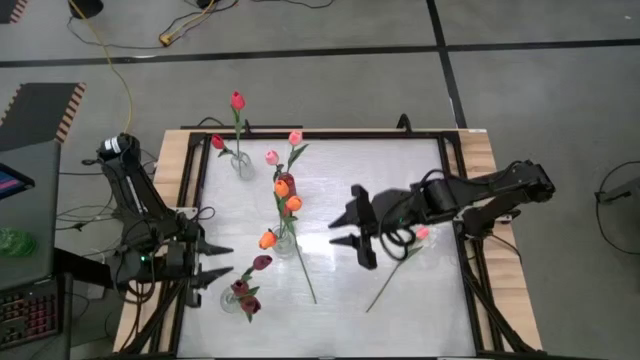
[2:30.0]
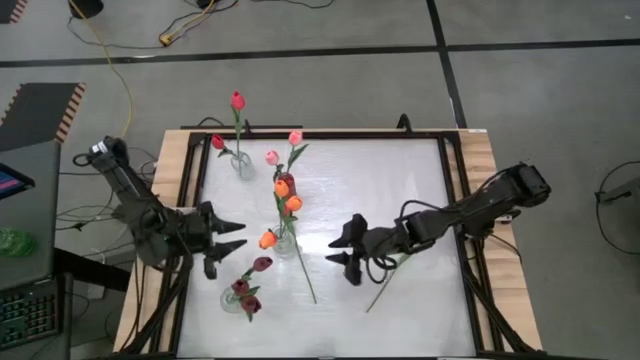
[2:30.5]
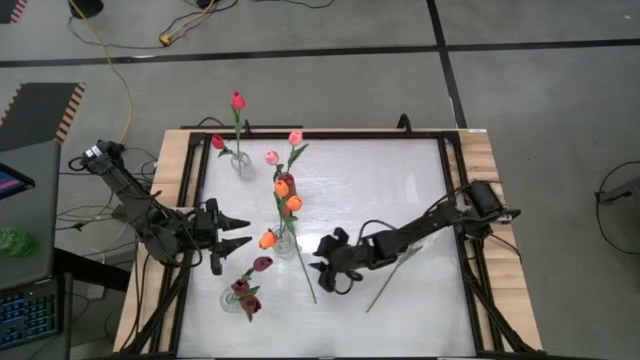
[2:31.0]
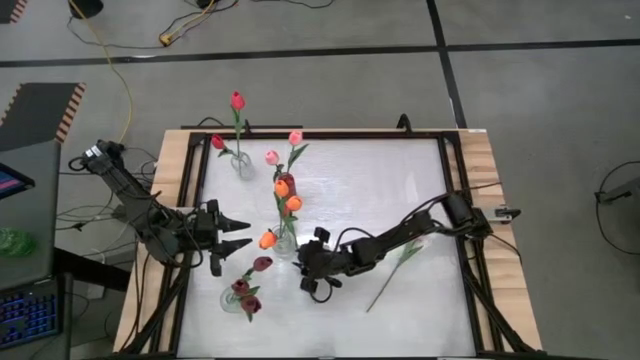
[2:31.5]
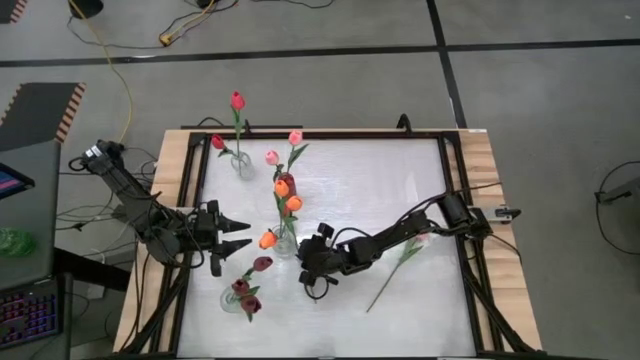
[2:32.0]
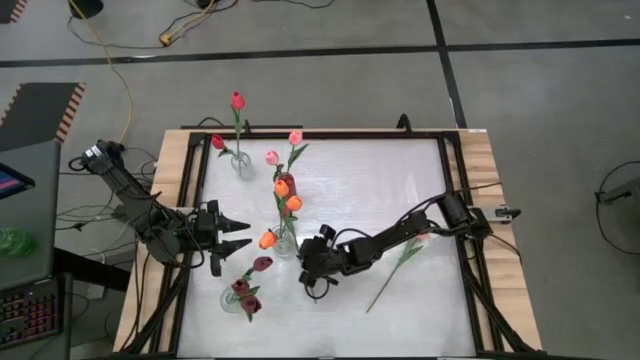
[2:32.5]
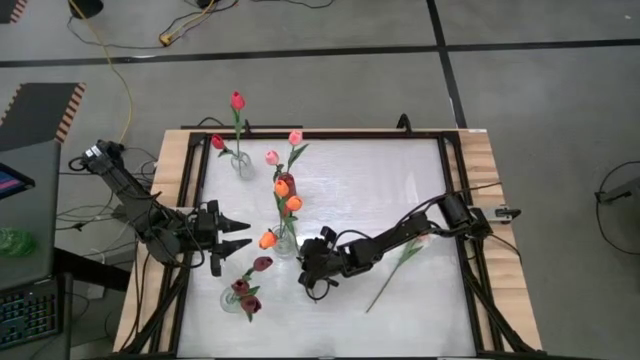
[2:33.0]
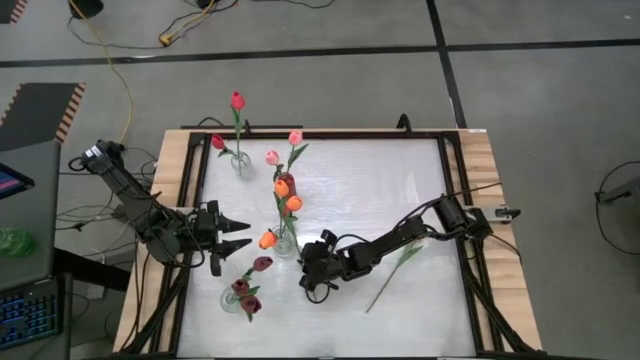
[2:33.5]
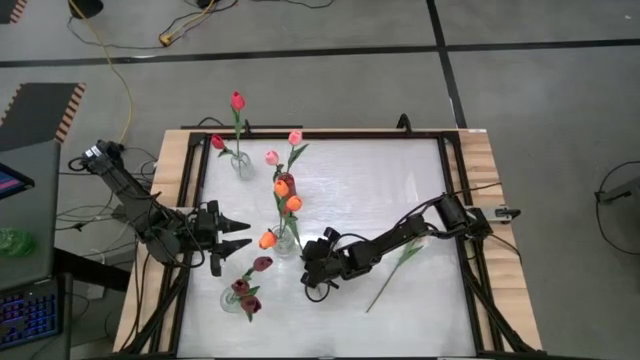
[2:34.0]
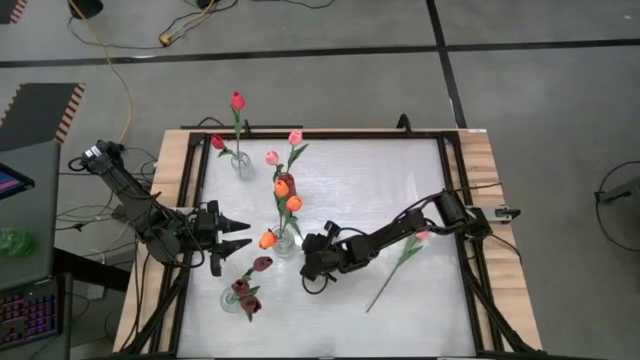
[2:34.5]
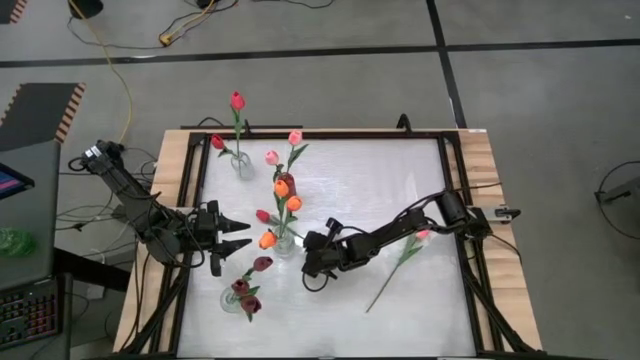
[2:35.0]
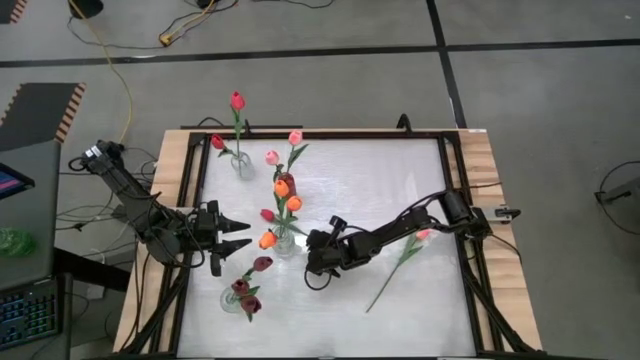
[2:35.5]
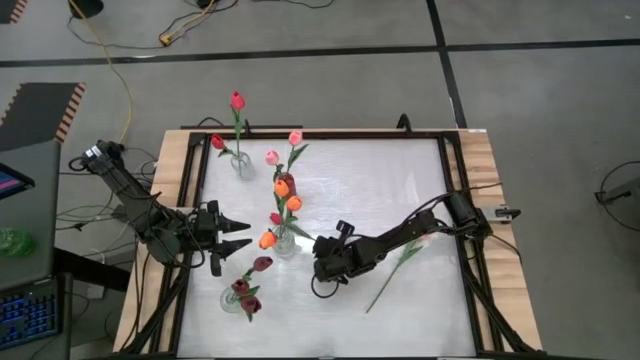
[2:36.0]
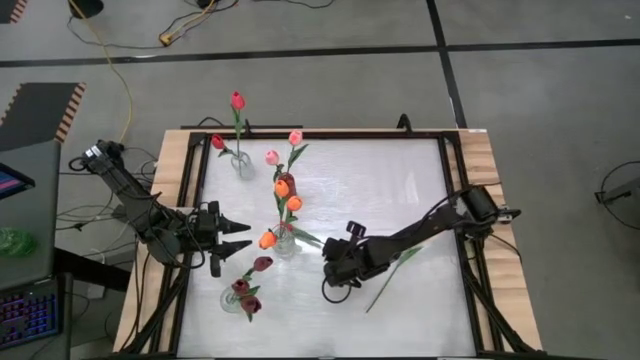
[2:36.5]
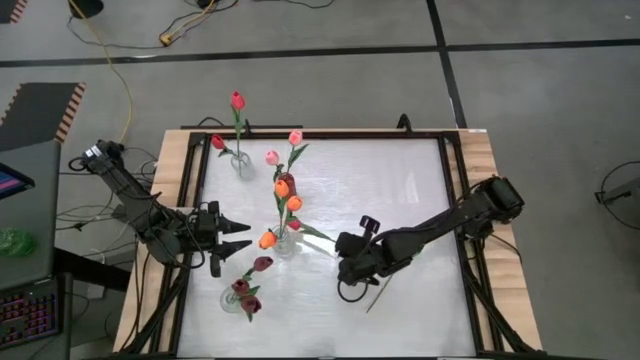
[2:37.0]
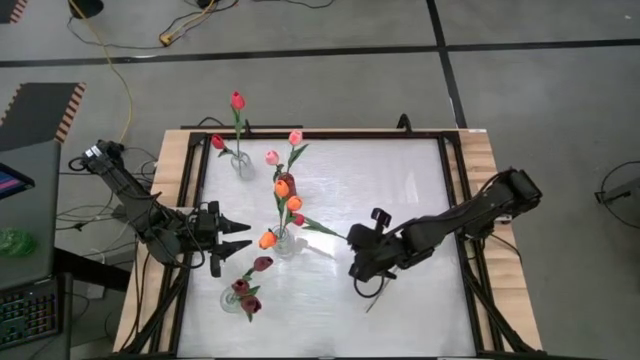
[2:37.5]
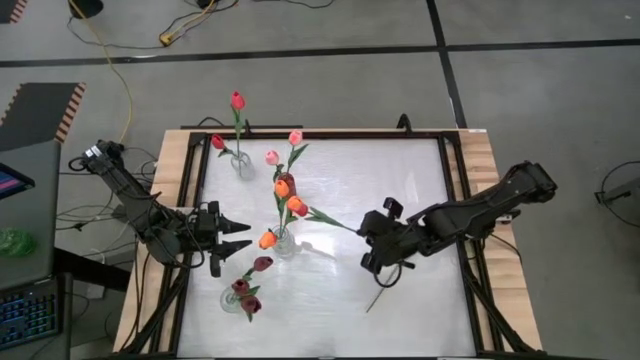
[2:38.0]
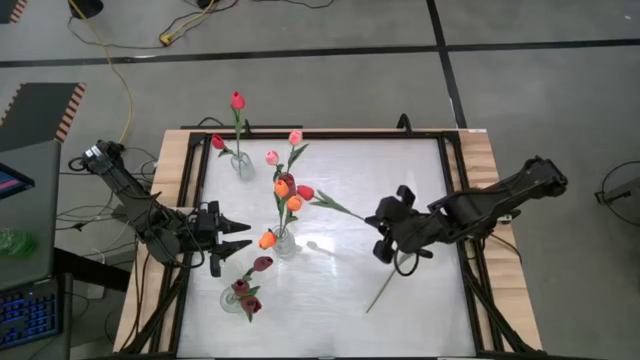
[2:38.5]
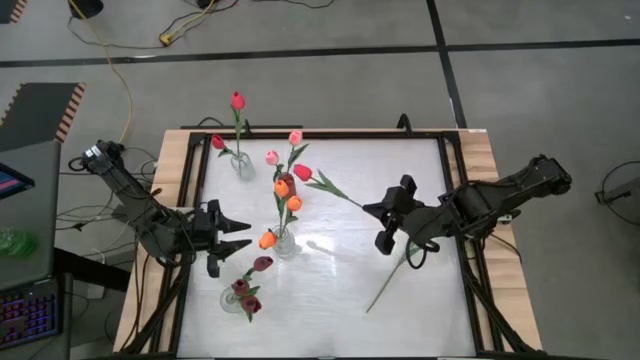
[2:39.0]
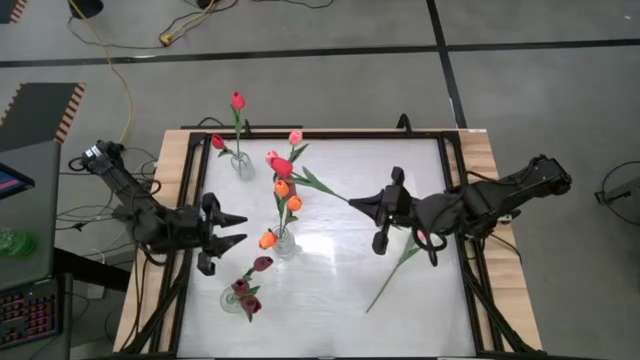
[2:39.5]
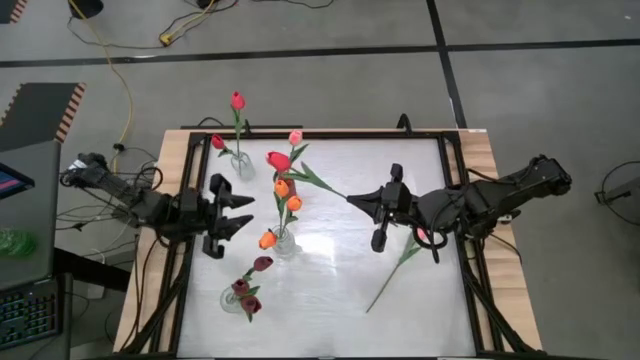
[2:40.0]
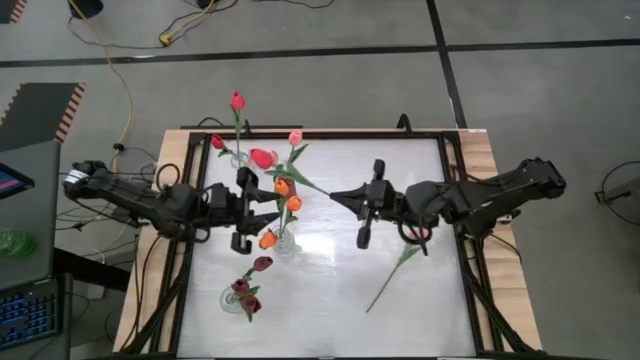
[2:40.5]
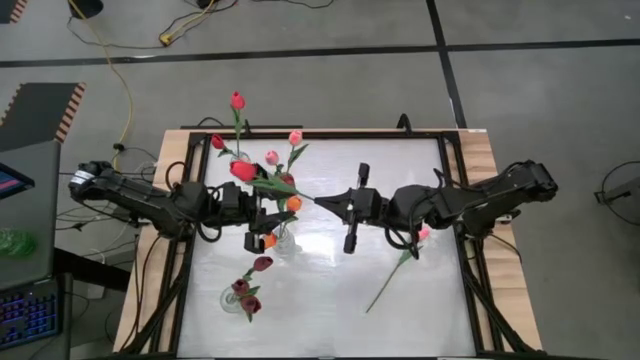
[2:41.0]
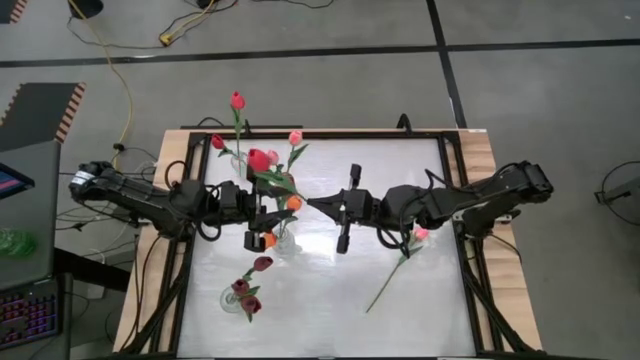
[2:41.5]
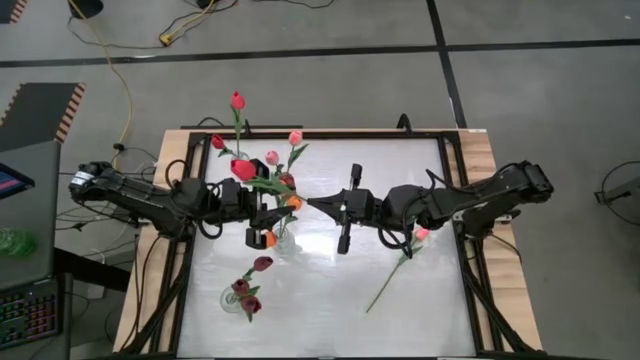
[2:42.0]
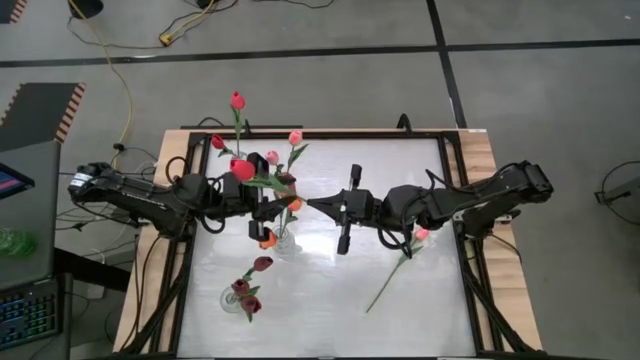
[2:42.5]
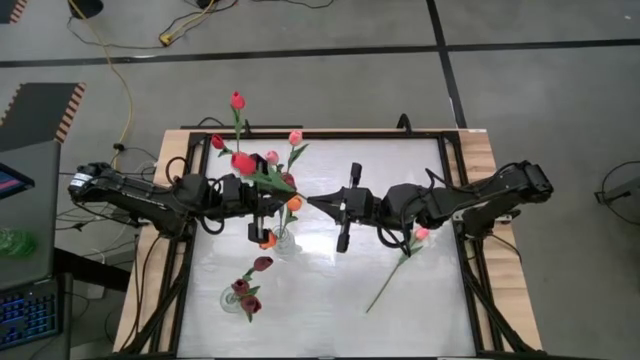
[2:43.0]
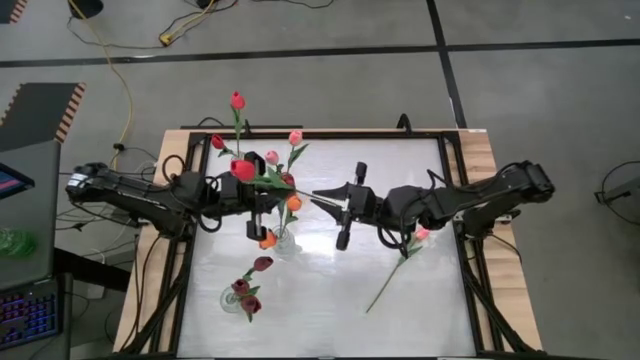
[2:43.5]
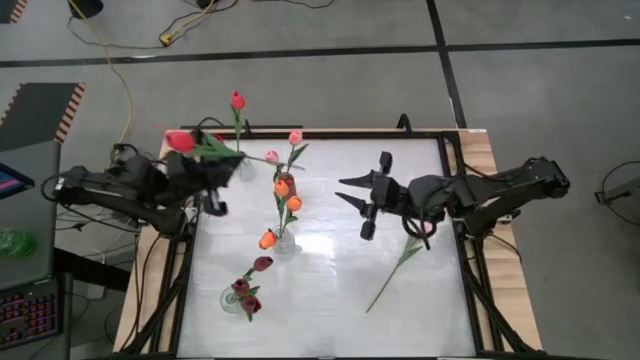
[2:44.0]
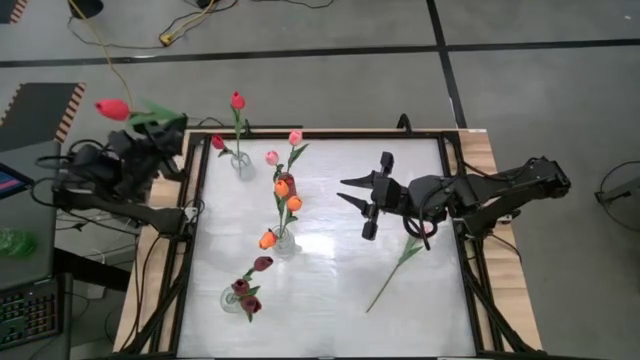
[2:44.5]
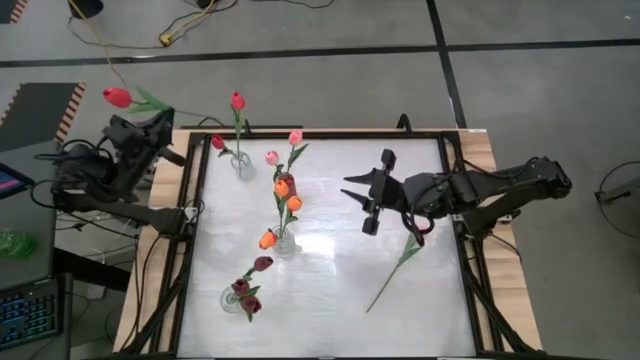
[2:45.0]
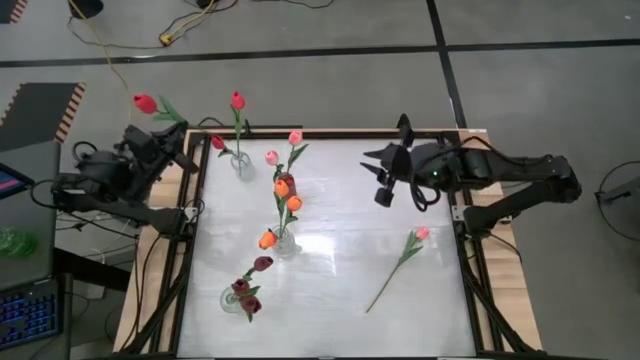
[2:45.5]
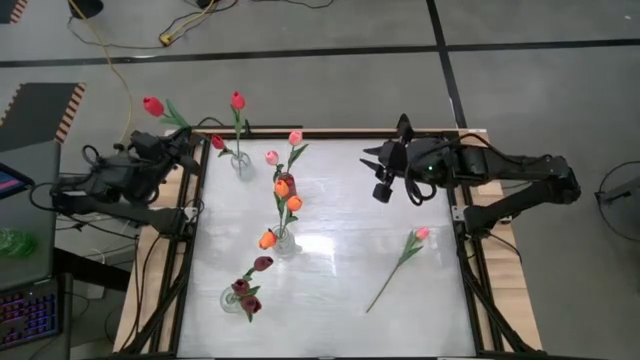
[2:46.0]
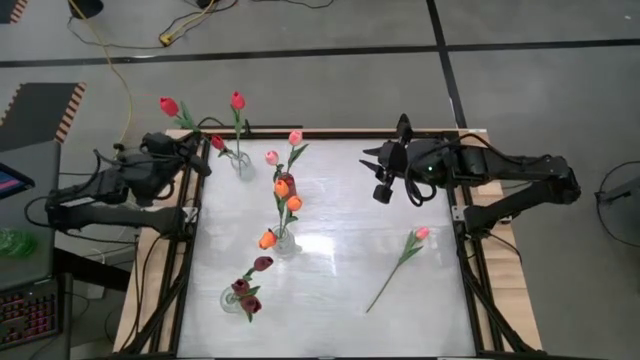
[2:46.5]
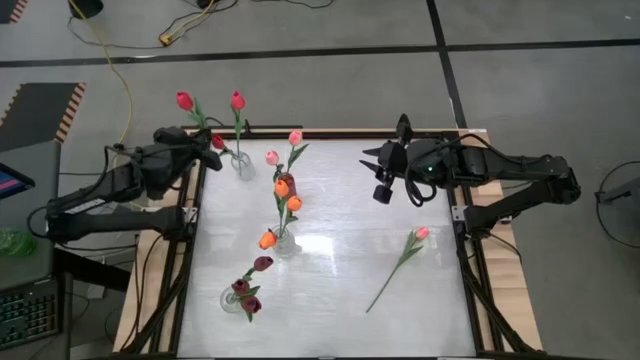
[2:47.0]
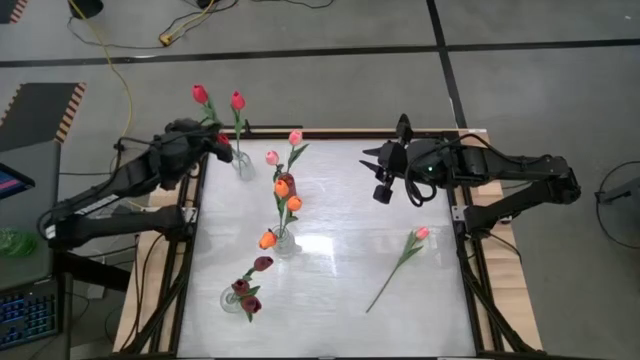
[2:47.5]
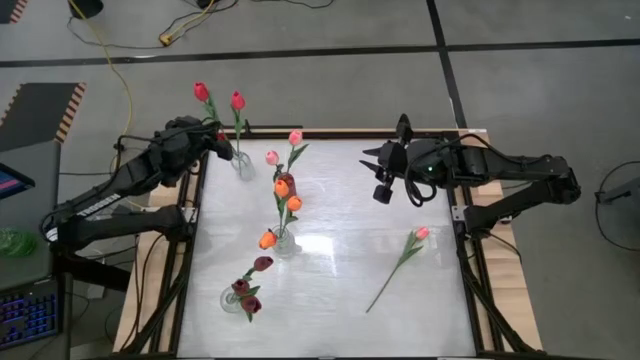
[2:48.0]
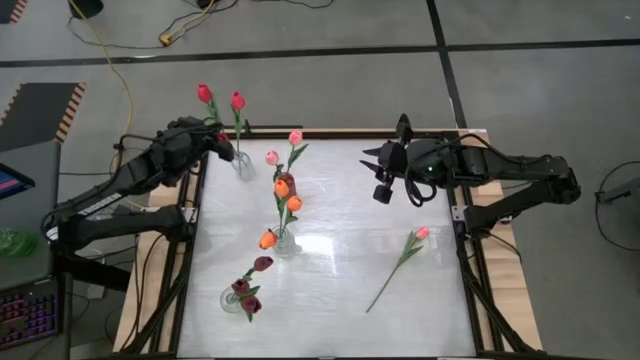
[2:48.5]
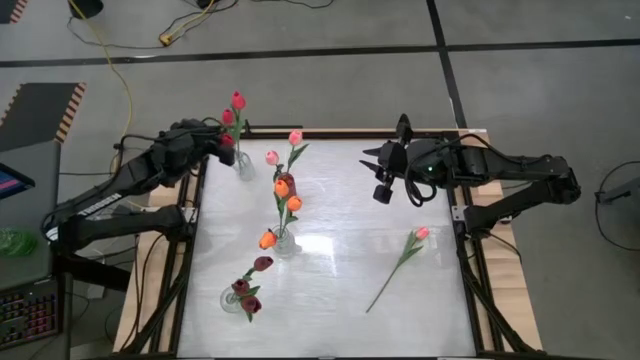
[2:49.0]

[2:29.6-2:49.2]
Task: Sort flowers into vase by color
Put the red tulip into the top transparent vase

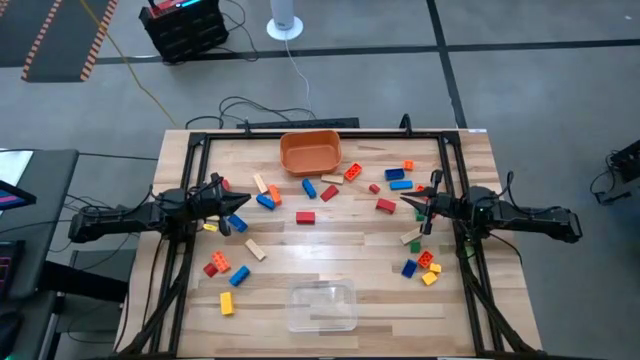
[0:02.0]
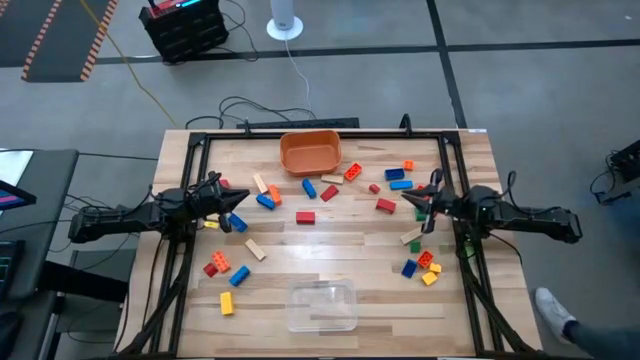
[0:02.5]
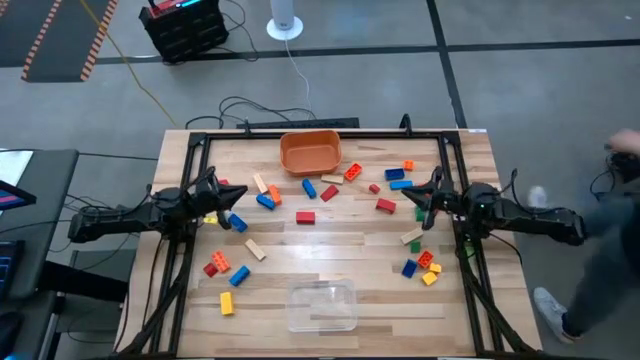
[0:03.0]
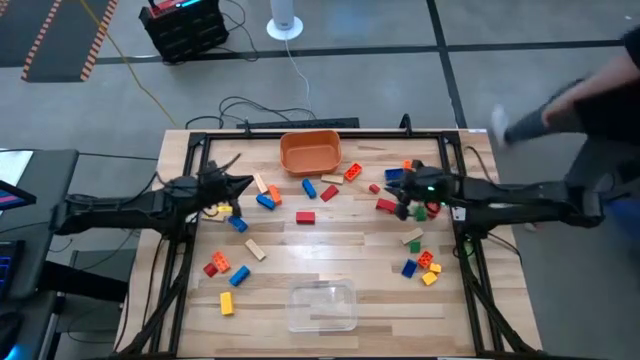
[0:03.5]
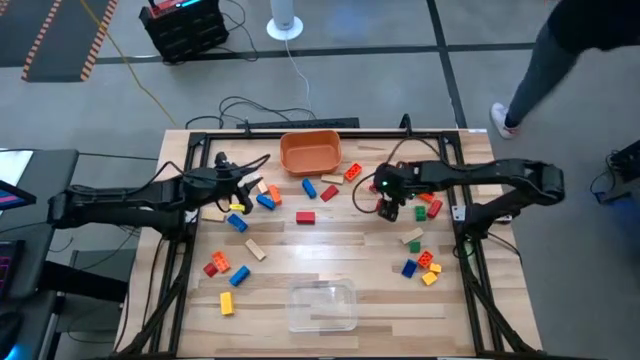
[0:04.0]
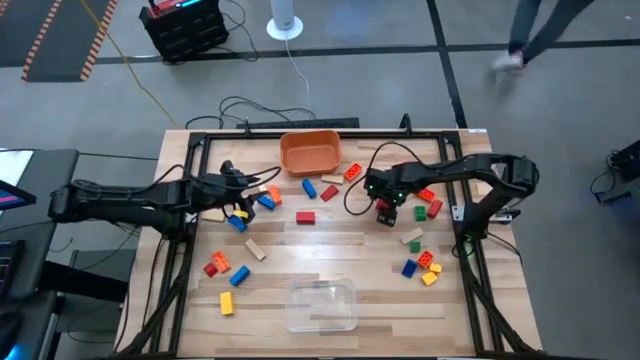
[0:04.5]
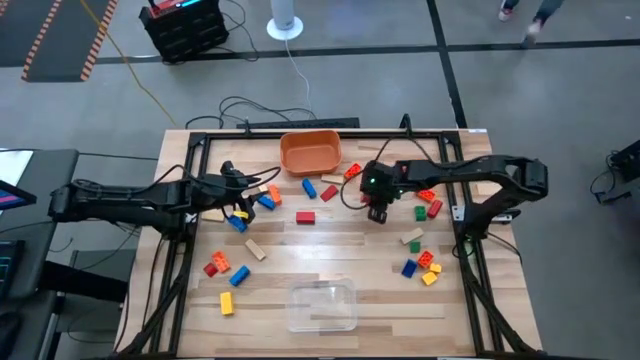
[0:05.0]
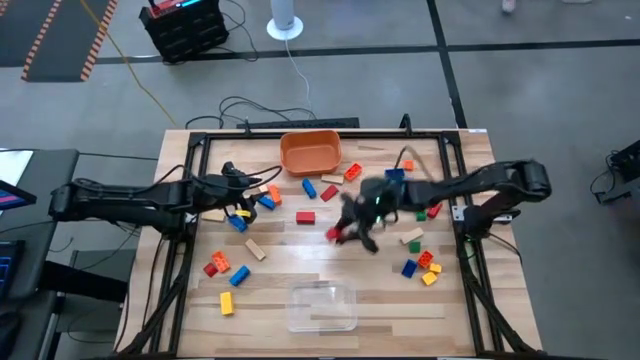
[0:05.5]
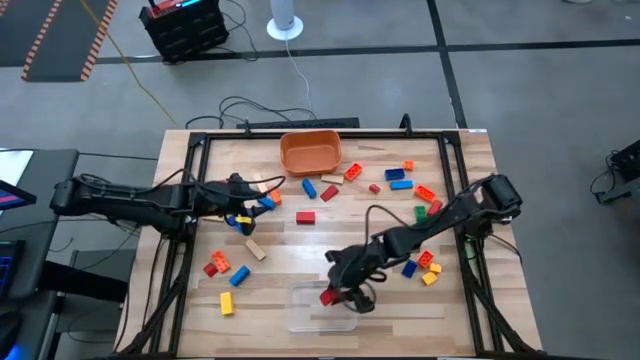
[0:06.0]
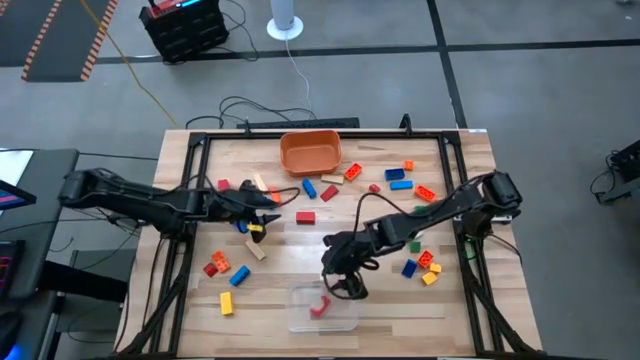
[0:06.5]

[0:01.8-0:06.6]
Task: Sort blocks by size
Put the large red wooden block into the transparent bin
